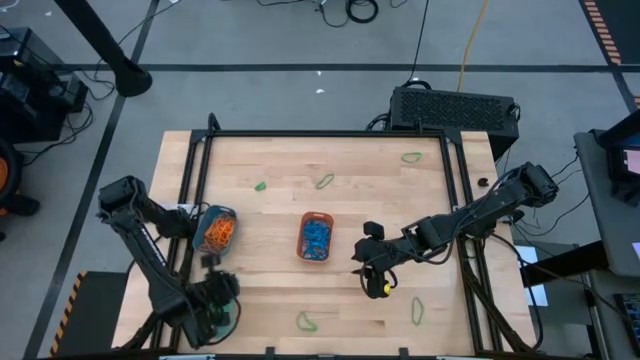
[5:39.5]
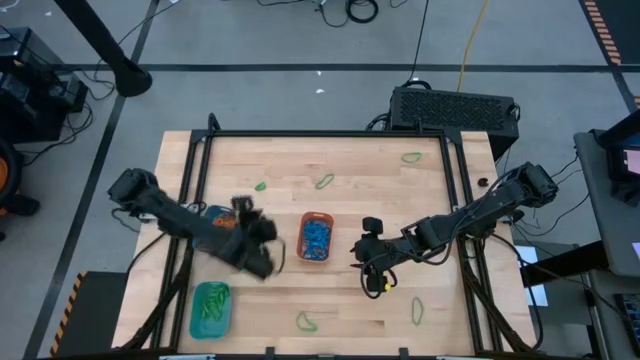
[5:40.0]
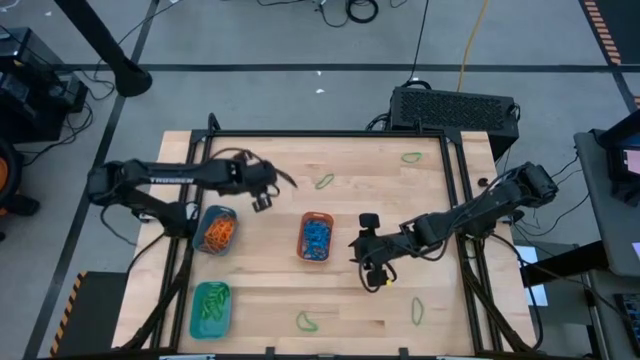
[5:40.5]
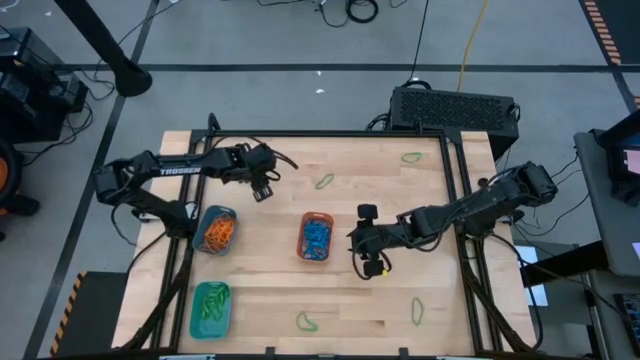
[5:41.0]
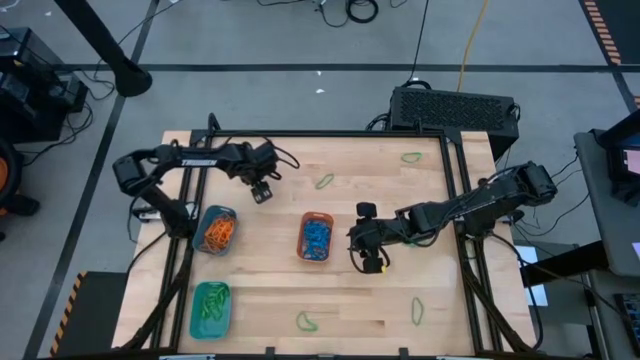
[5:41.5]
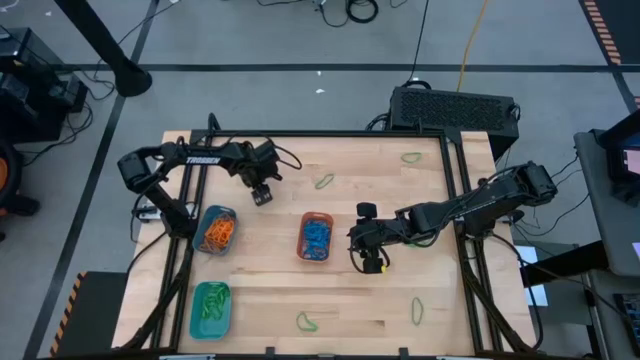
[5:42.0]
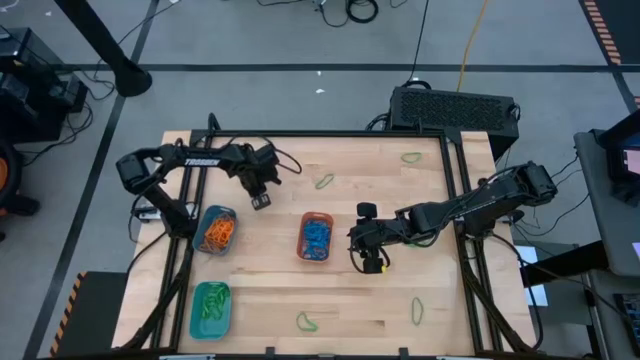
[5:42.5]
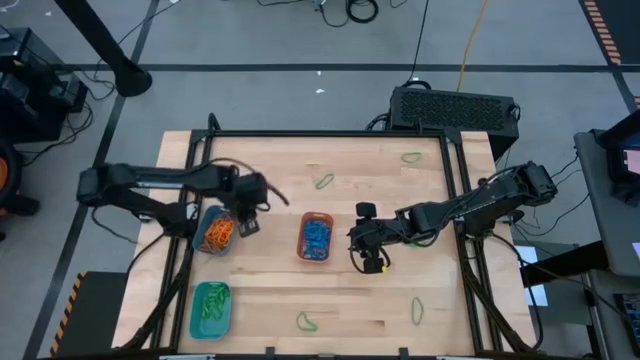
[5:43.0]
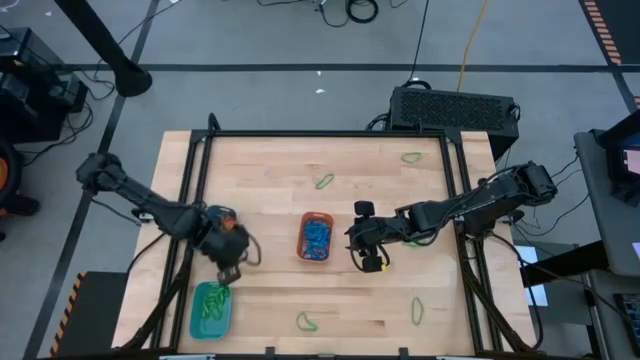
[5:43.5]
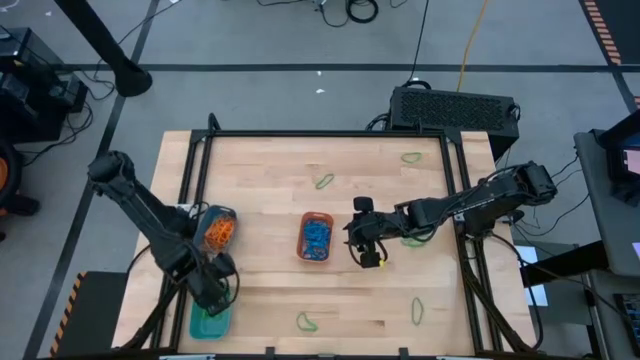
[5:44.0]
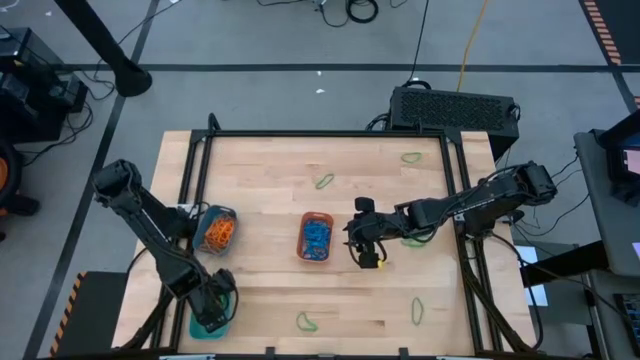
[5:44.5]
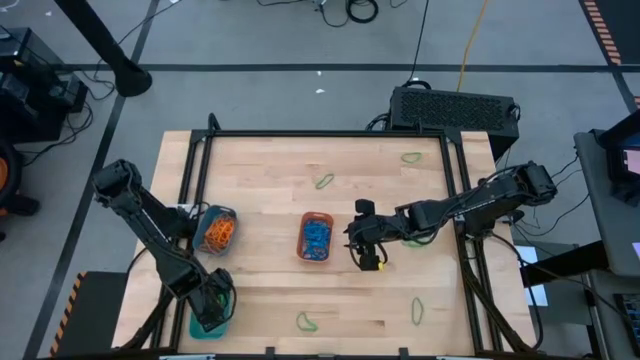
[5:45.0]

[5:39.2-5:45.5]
Task: Sort rubber bands into baskets
Put the green rubber band into the green bin

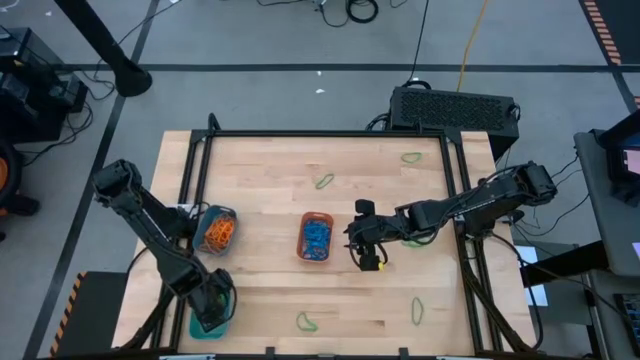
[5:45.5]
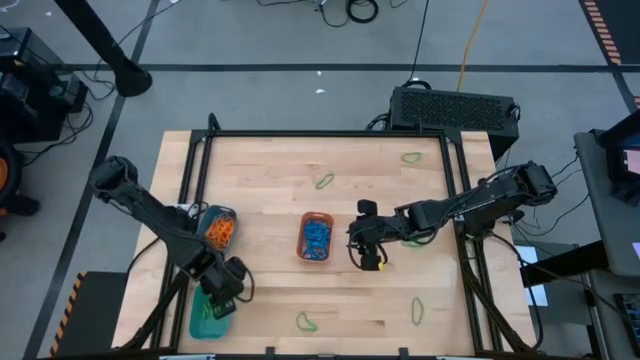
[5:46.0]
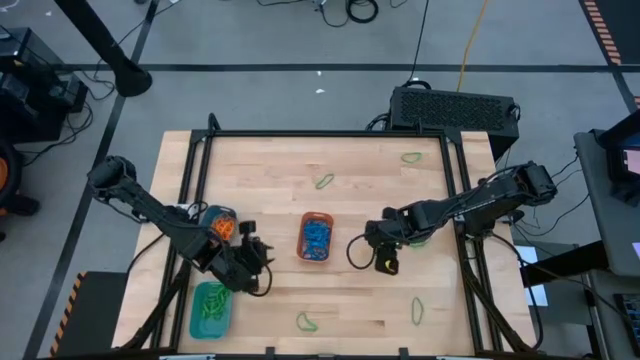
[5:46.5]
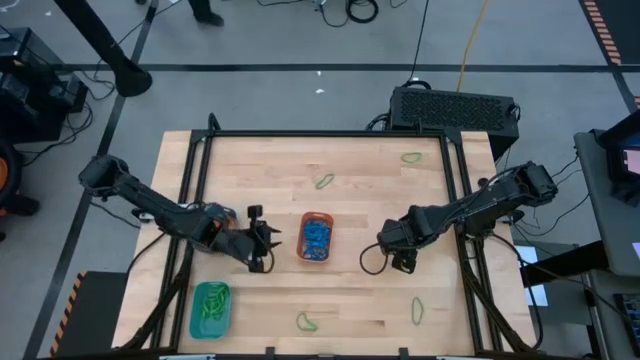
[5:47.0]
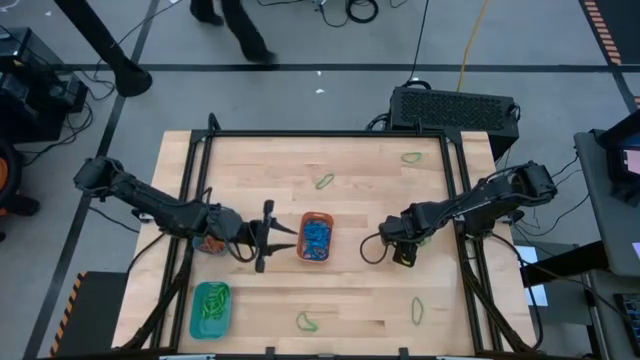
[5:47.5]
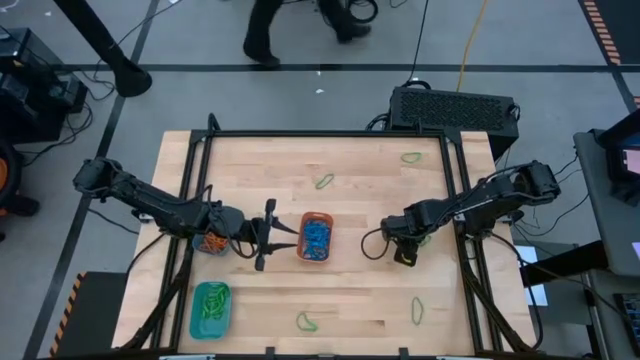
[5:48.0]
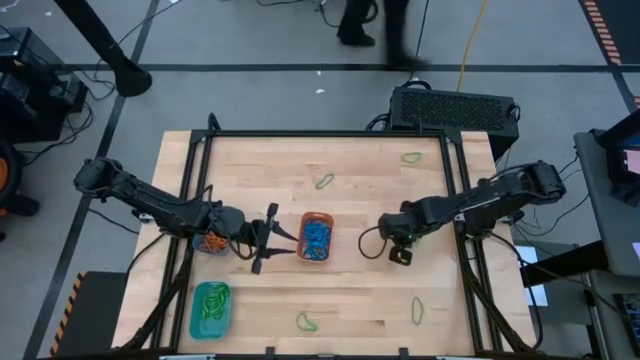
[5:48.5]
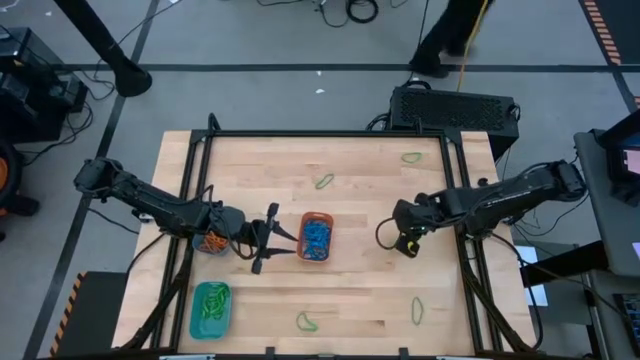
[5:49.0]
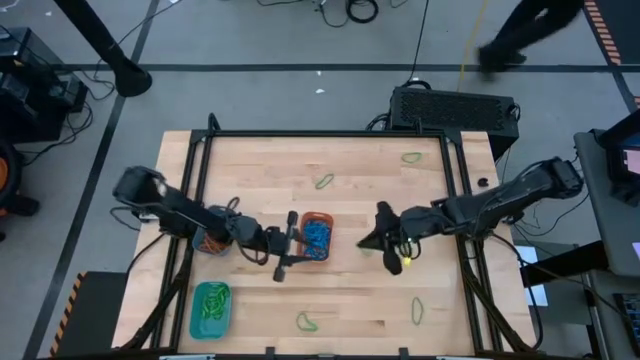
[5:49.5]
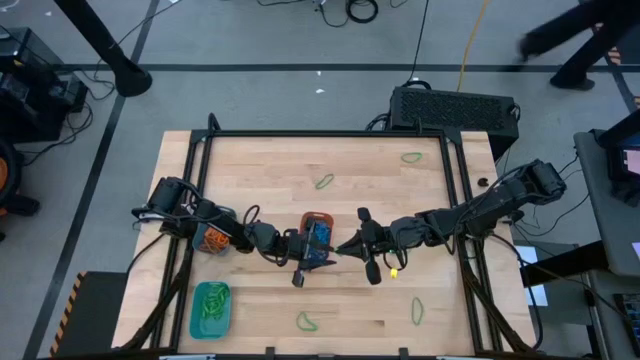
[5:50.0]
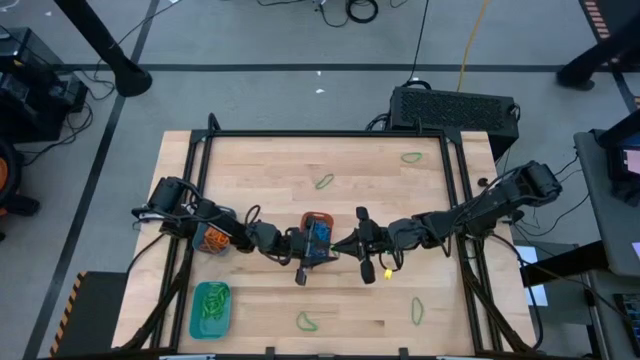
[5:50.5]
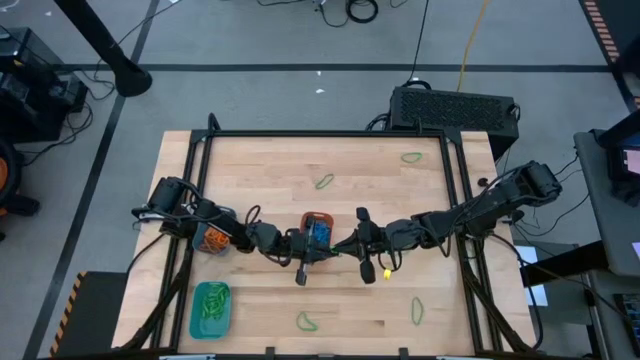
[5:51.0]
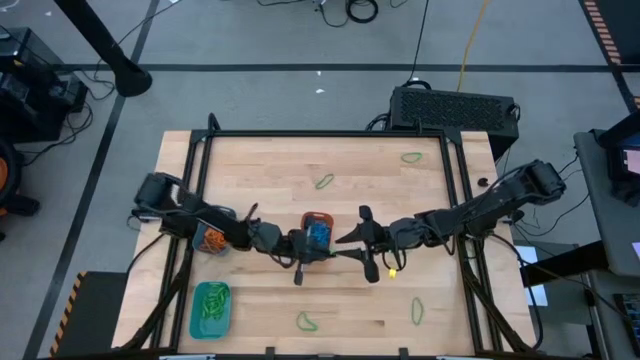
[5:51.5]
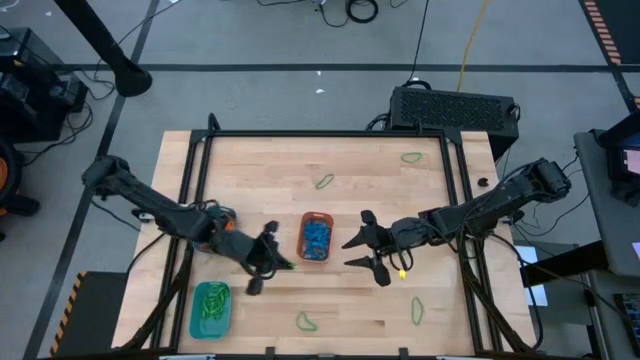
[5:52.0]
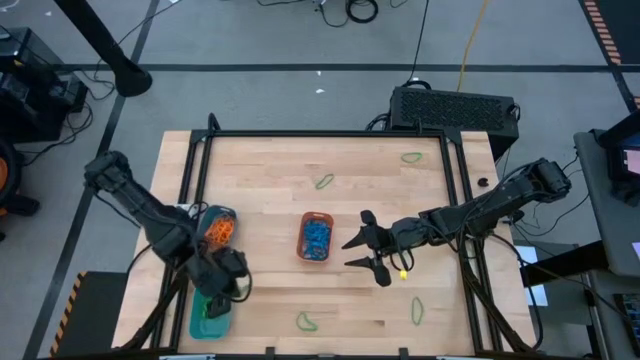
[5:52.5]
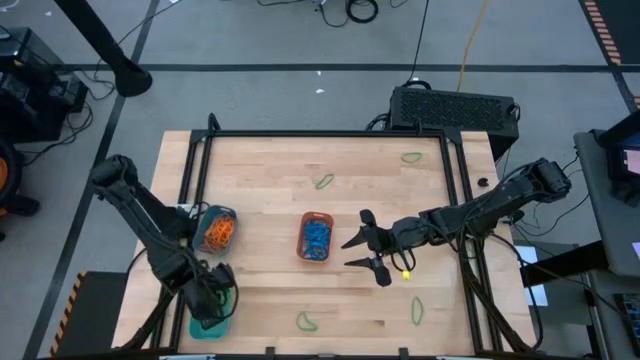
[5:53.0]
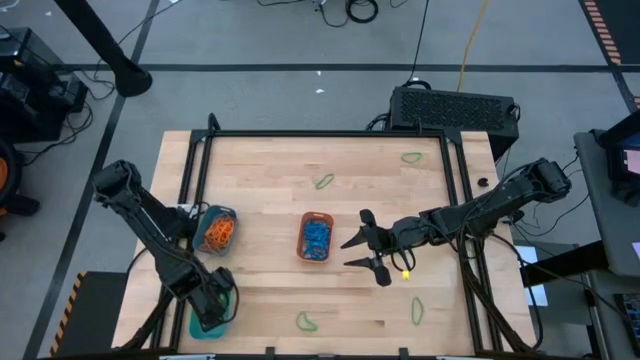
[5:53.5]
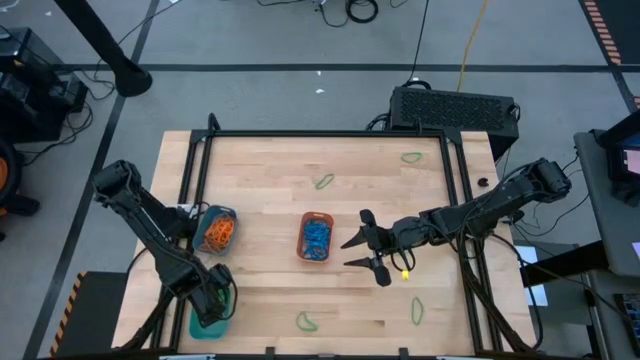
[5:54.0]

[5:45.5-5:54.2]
Put the green rubber band into the green bin

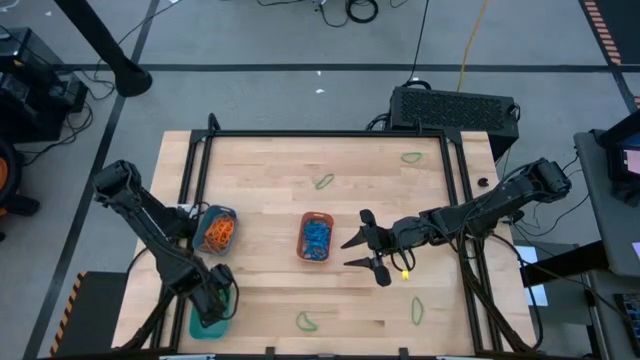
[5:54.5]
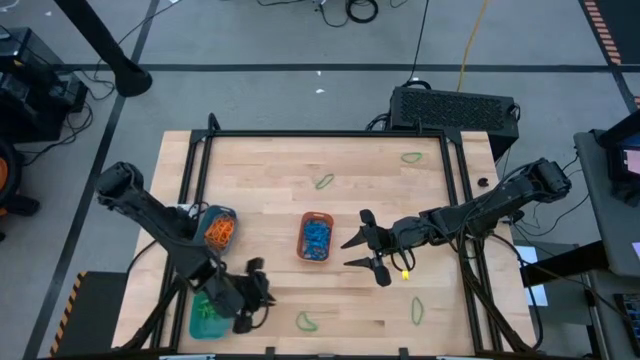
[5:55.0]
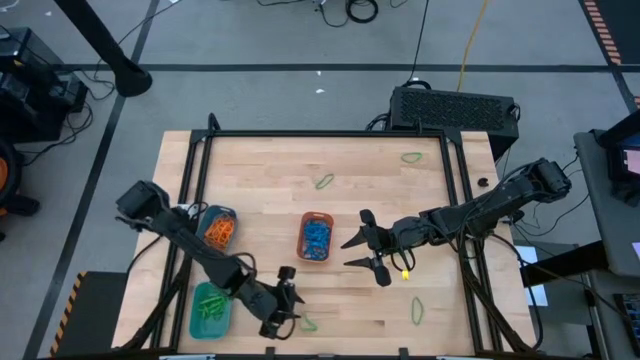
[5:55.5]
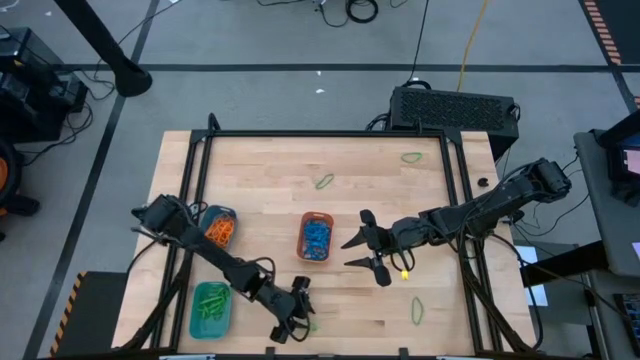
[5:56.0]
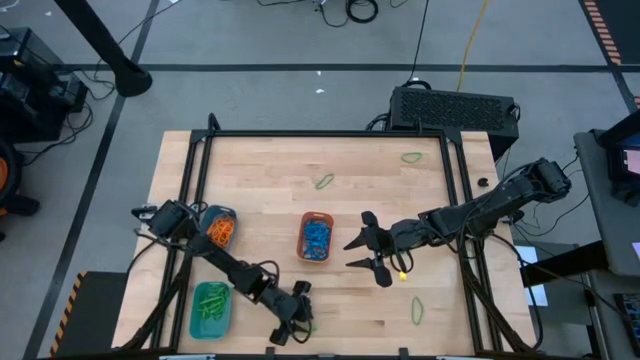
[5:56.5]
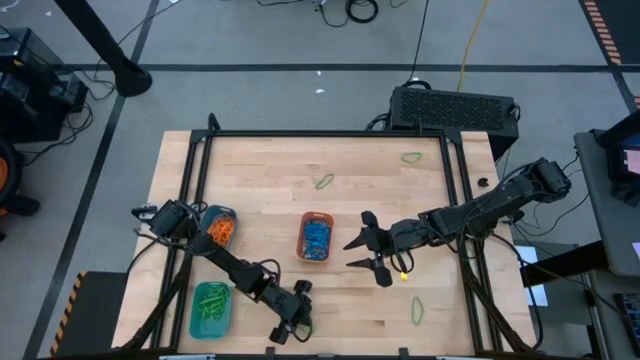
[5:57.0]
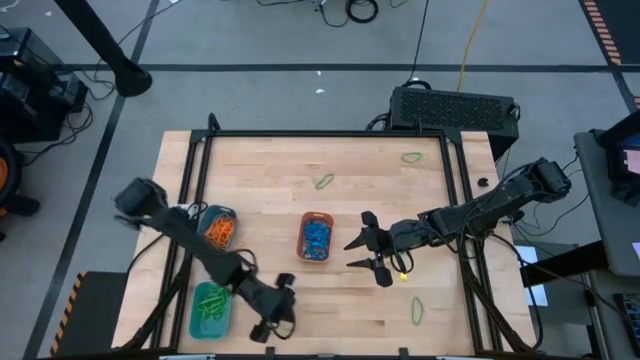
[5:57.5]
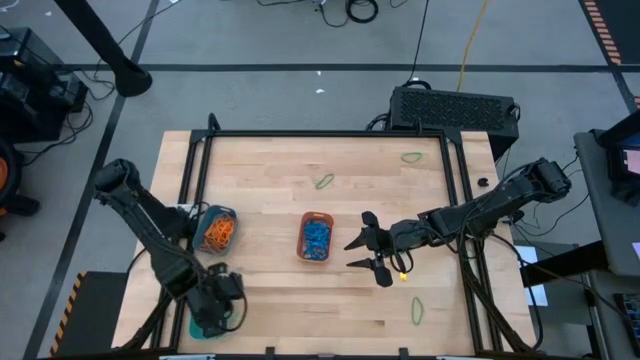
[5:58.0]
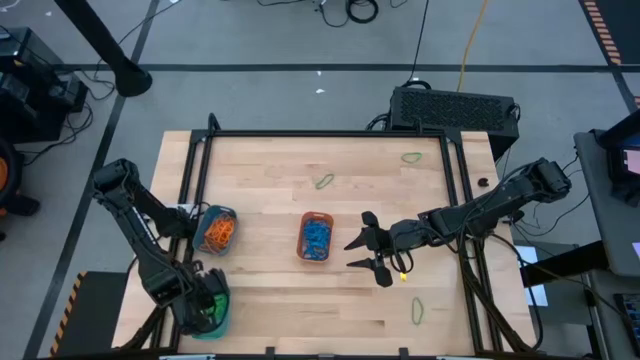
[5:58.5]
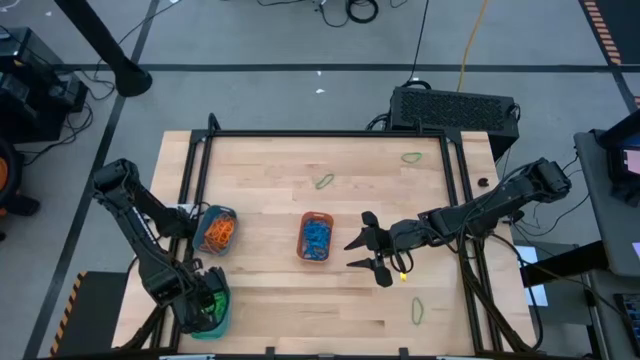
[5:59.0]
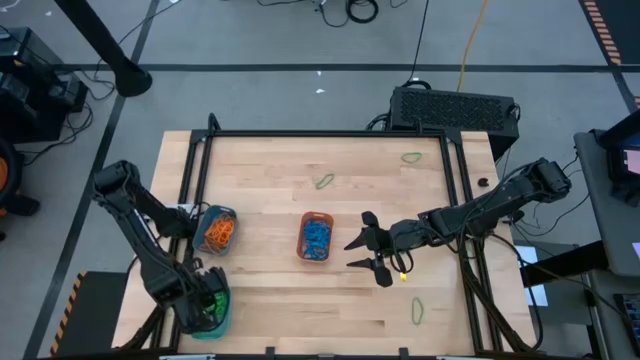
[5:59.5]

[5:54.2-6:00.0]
Put the green rubber band into the green bin
